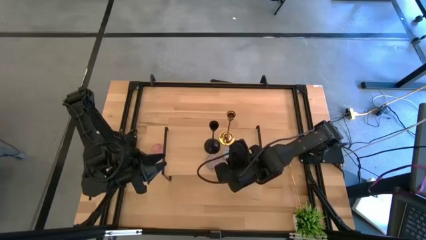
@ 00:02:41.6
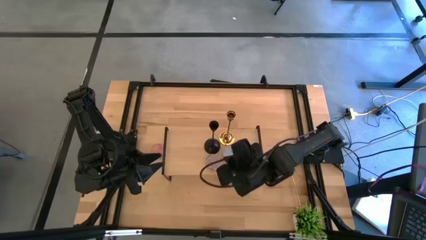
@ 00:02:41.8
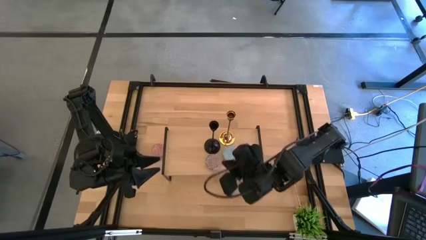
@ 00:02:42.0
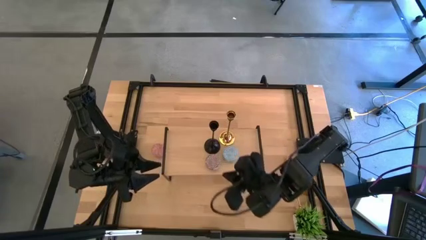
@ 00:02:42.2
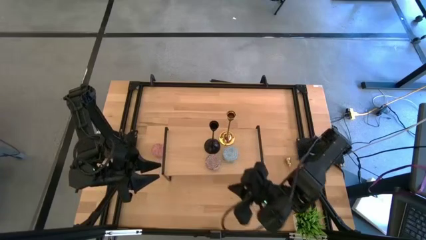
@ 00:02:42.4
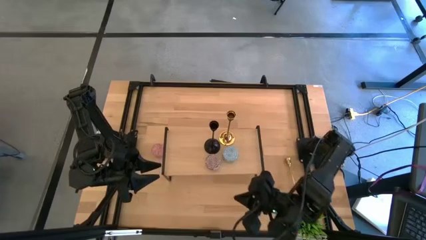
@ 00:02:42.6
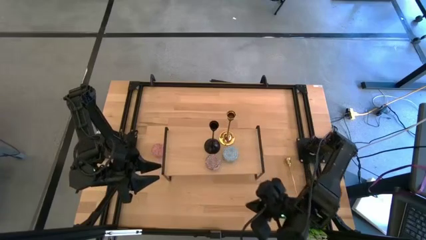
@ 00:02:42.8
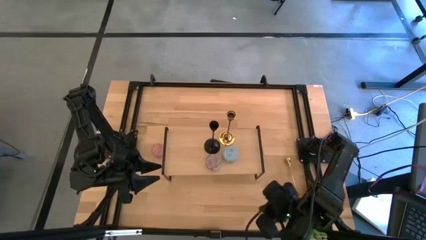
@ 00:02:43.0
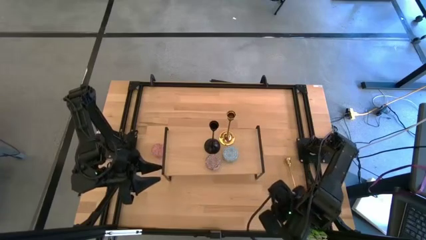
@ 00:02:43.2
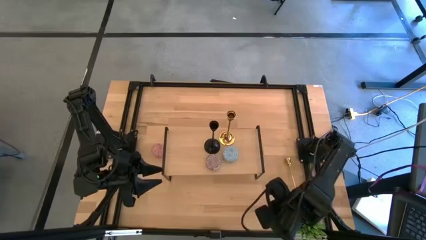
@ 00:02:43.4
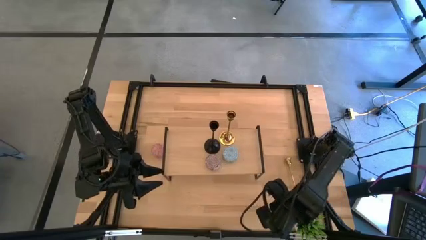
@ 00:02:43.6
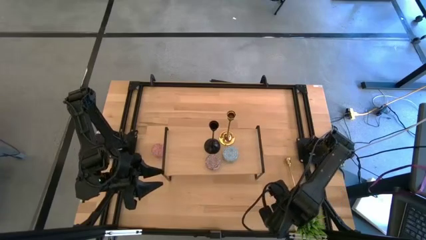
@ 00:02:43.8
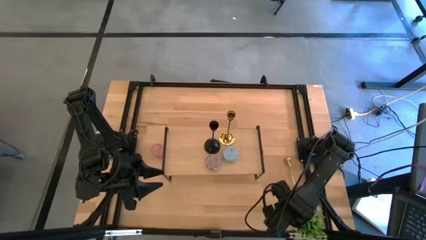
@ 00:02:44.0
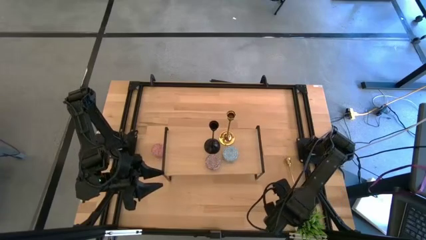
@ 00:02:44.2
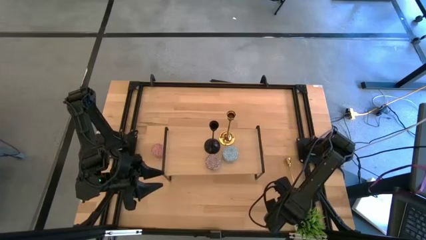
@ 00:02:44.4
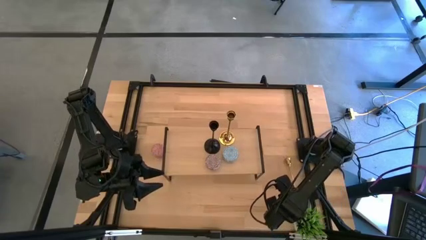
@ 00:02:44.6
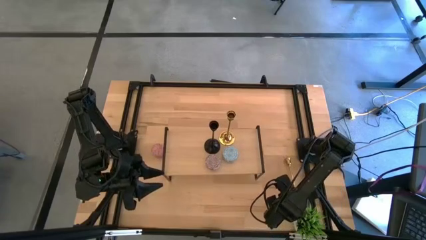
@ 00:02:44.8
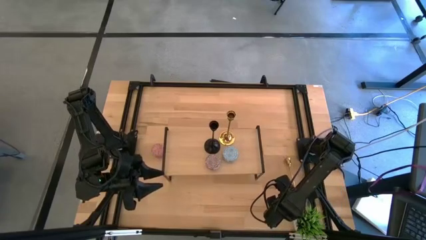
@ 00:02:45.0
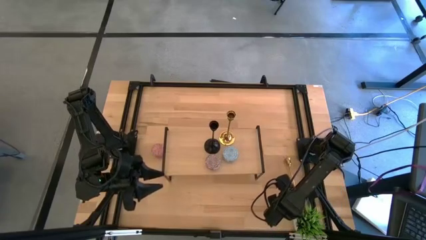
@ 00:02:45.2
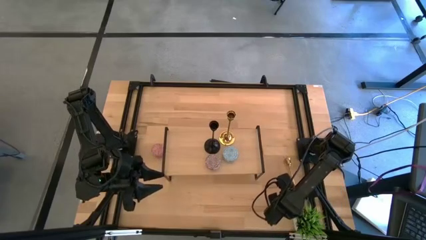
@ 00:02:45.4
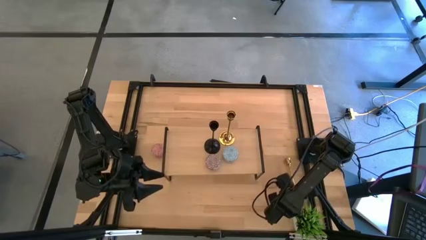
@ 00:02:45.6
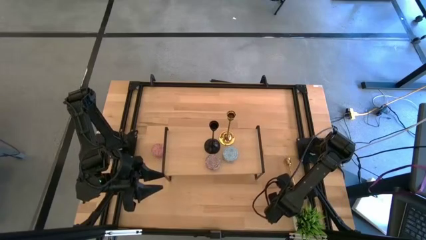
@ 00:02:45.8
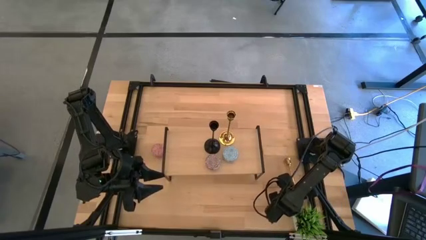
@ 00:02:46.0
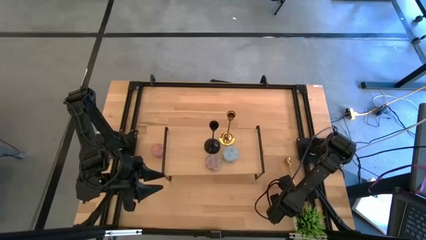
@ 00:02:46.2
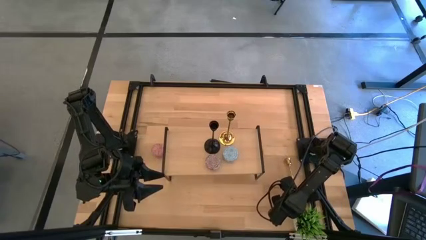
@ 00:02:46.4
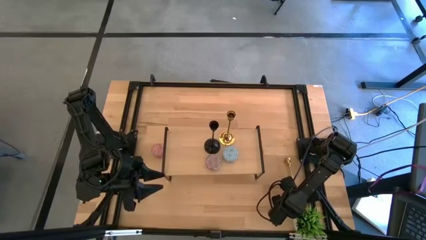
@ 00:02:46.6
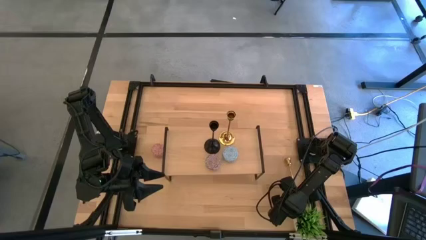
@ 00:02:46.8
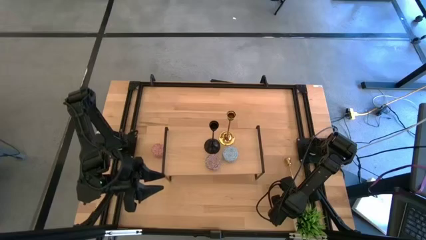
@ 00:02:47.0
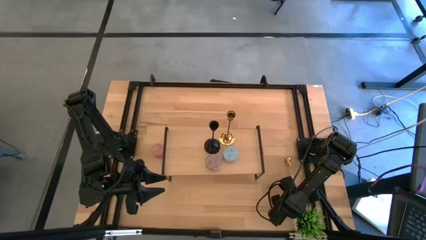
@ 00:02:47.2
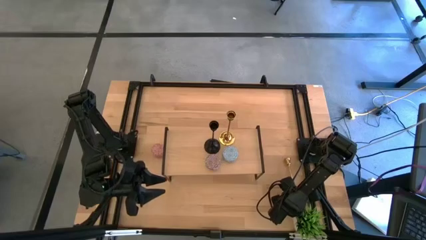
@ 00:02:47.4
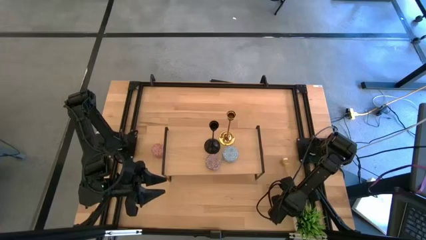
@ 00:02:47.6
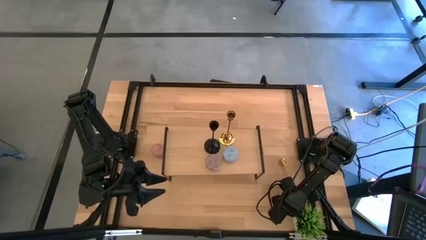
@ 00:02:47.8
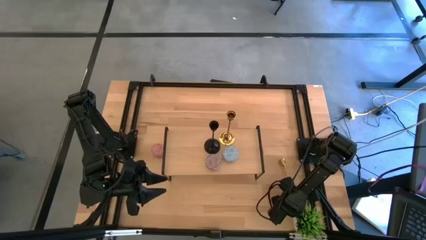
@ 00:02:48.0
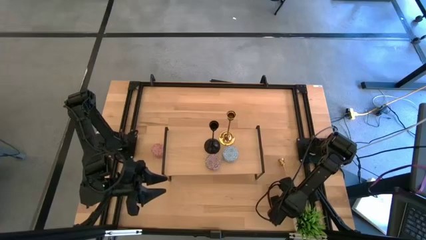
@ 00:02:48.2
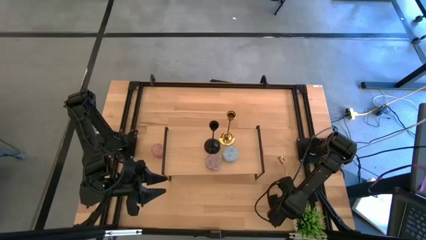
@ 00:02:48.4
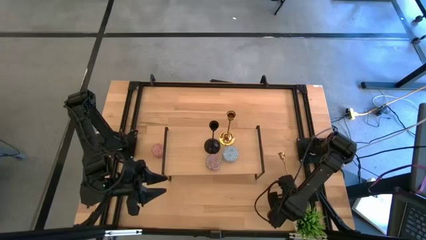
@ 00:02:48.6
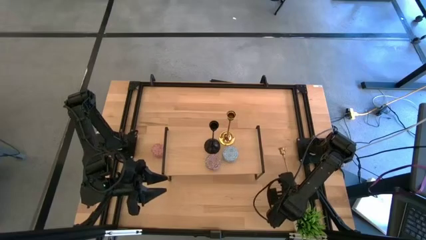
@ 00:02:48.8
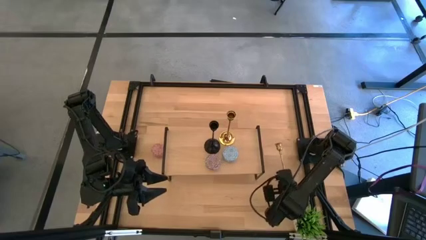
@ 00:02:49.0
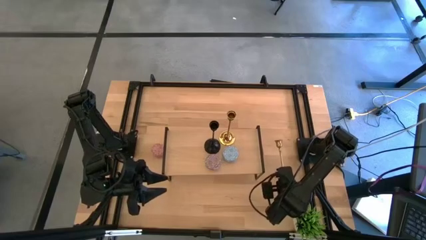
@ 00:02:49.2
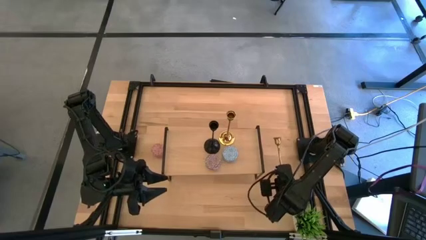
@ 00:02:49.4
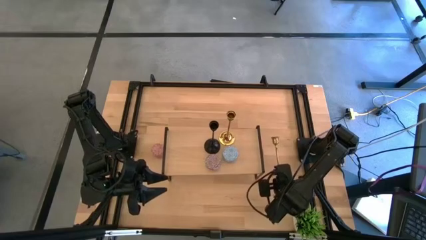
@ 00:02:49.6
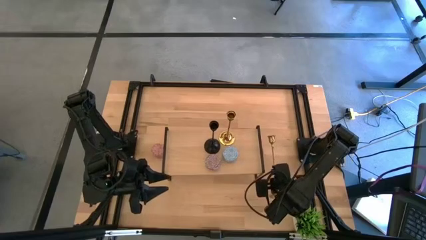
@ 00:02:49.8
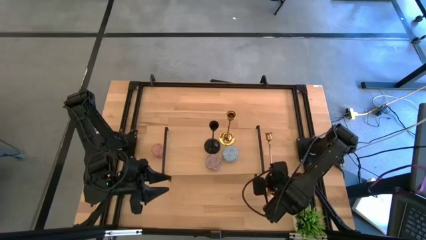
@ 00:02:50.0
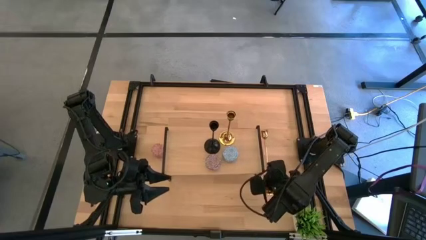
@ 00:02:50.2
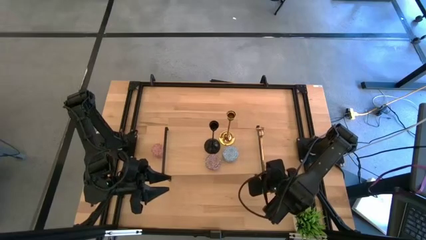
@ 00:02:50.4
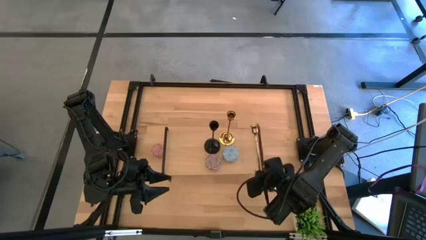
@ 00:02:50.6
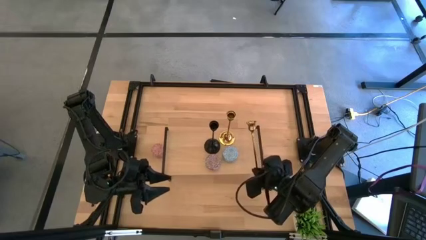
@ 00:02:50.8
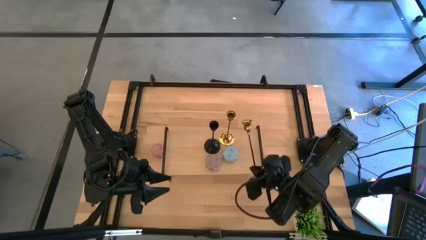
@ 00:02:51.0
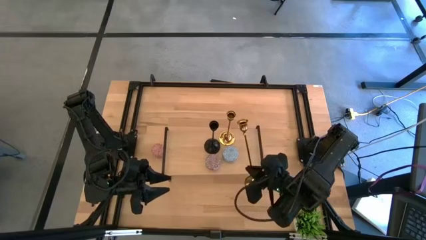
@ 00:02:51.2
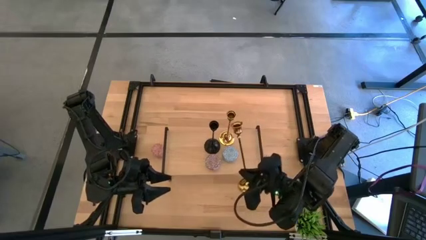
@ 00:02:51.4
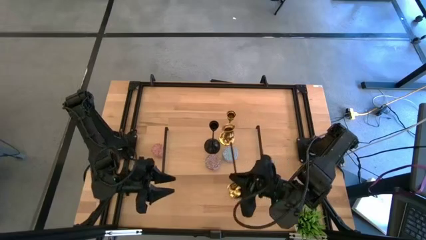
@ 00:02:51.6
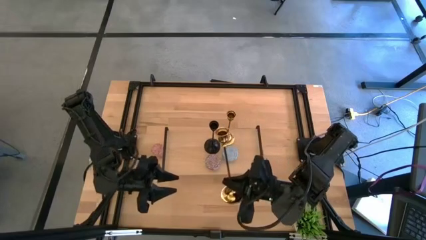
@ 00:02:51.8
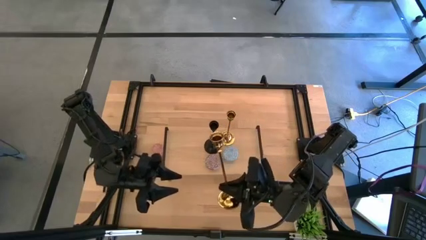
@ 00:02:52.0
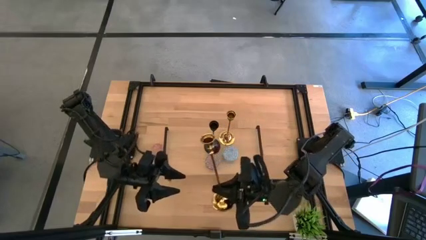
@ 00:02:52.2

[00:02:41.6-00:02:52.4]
Task: Pick & Place candle stick holders
Put the gold candle holder on the shelf
